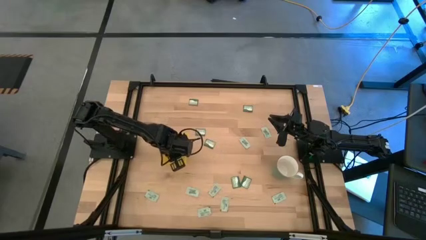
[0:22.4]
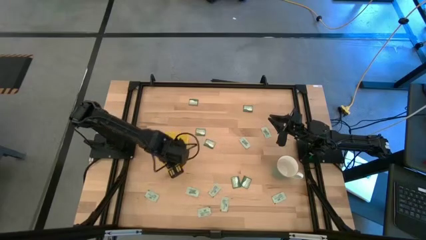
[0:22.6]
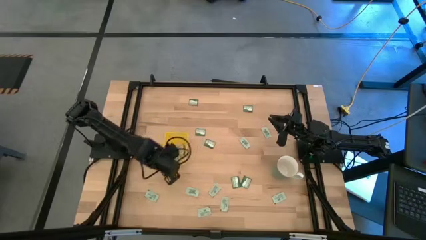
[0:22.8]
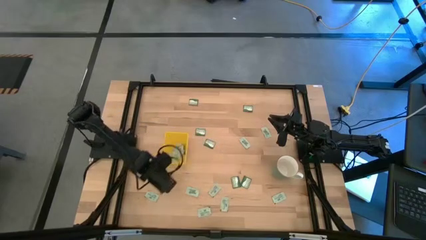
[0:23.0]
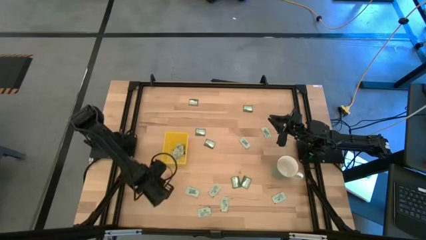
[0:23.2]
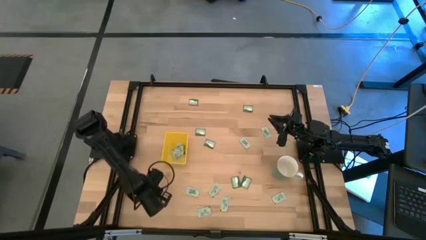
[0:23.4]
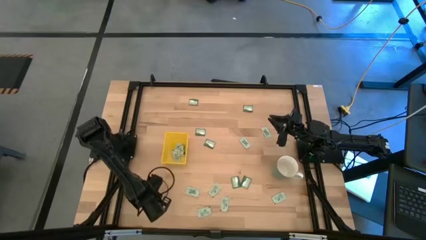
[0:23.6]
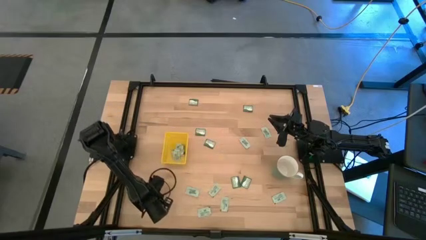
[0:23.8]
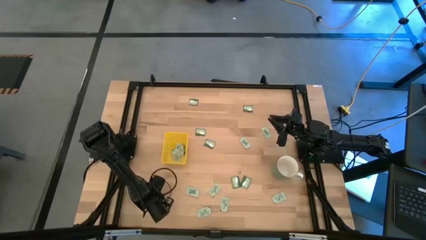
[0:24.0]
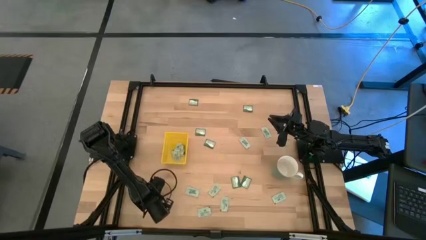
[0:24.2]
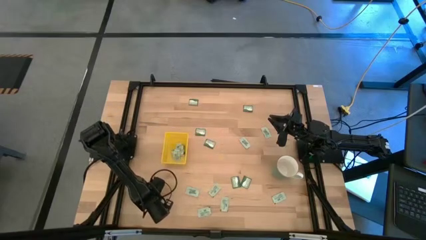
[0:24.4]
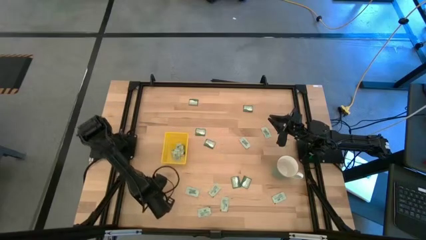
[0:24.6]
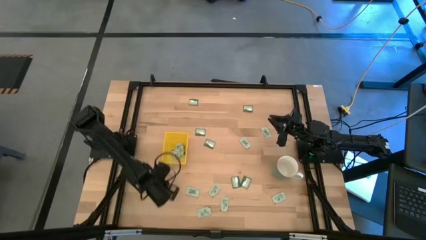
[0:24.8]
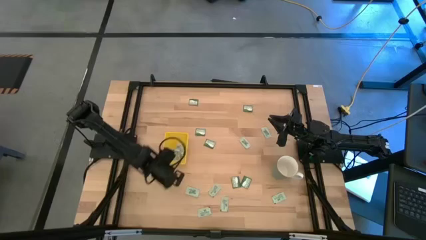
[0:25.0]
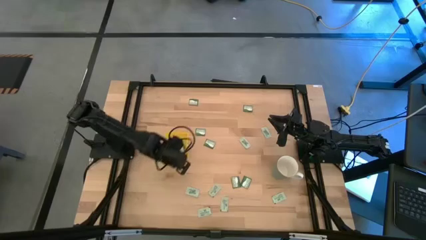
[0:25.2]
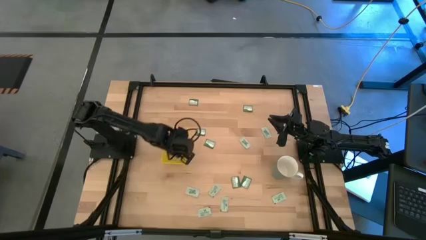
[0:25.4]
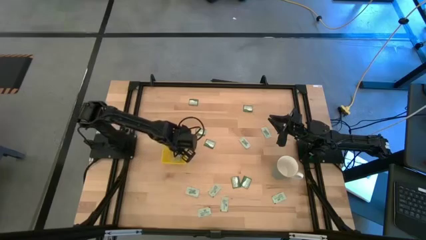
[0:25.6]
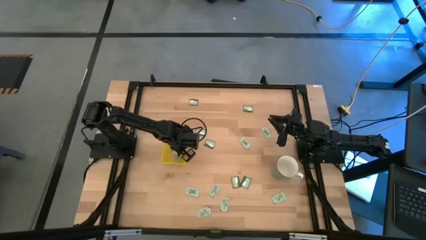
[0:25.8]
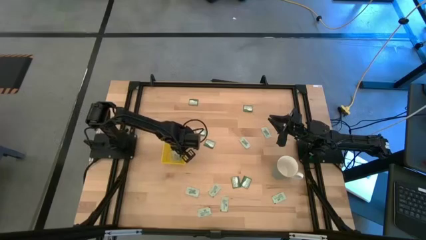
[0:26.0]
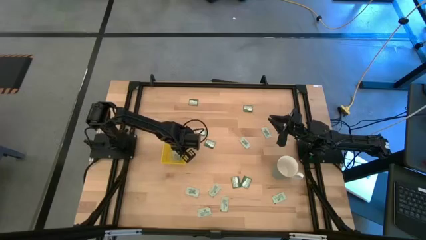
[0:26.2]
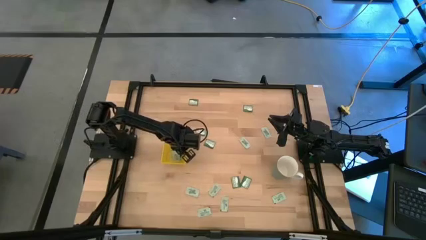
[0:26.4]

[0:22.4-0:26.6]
Task: Pick and place Stevia / Truvia into bins
Put the white packet into the yellow bin

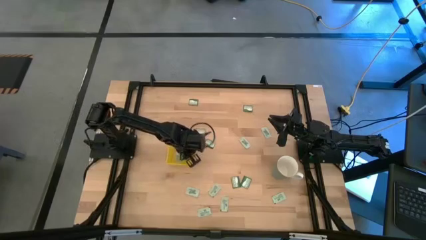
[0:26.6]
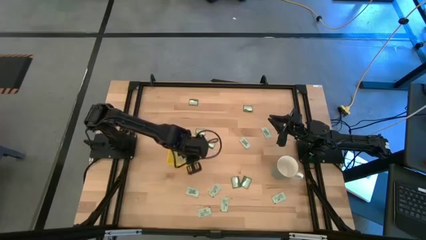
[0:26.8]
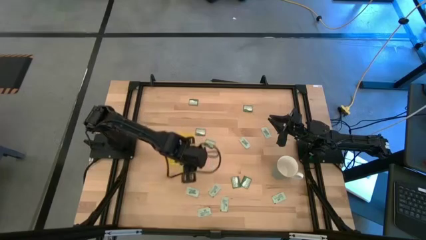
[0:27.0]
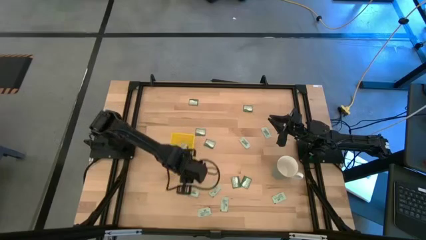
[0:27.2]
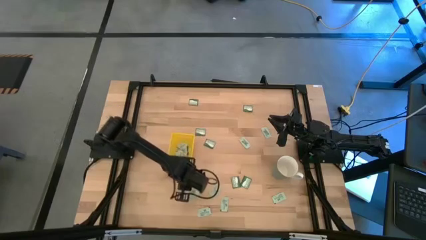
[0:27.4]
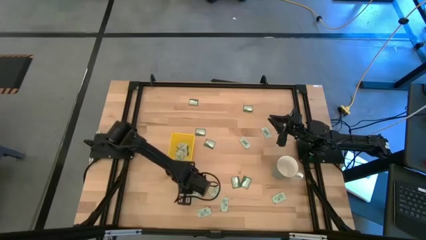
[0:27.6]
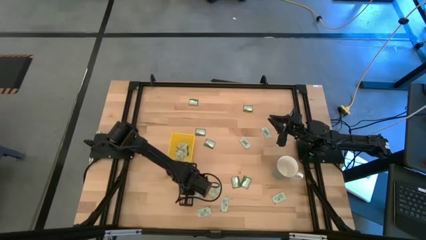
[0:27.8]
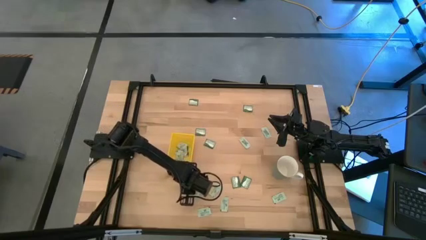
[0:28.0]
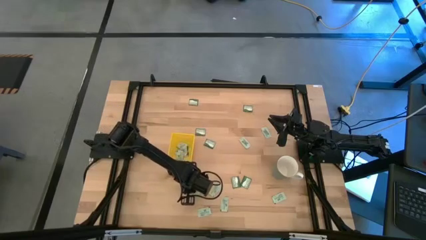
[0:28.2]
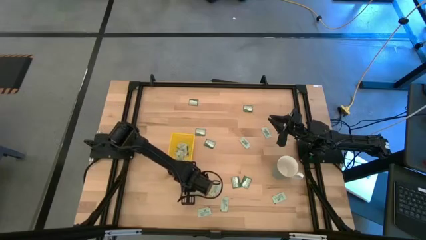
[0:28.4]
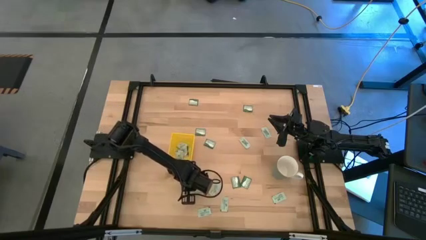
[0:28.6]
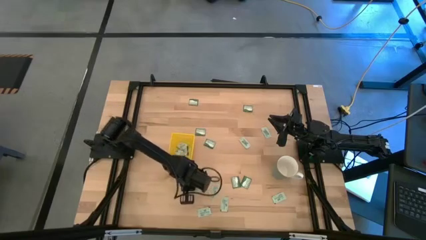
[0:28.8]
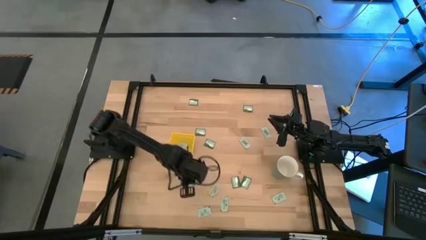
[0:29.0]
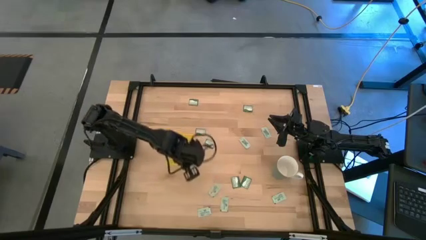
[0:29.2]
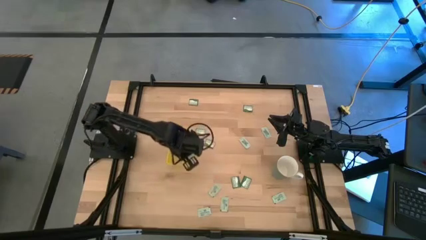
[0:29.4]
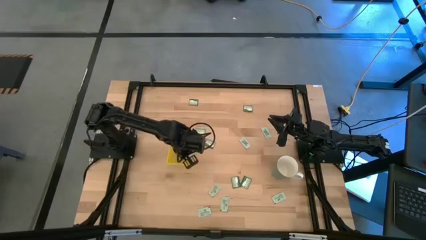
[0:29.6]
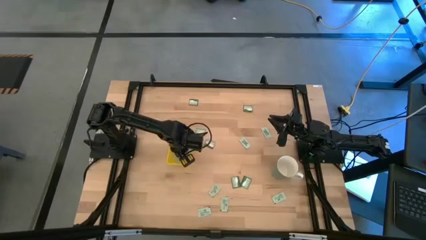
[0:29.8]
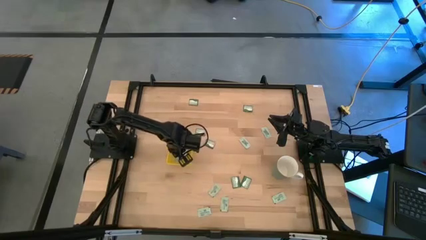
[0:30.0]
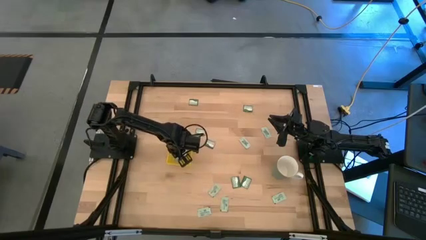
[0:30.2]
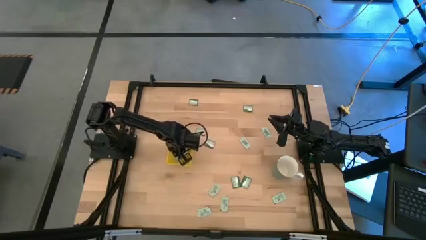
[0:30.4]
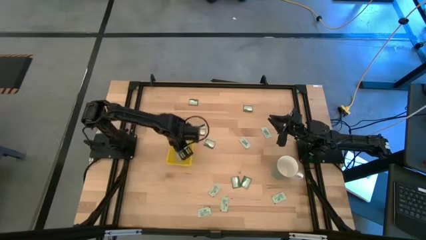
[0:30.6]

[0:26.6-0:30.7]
Put the white packet into the yellow bin

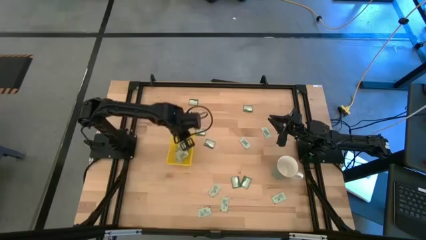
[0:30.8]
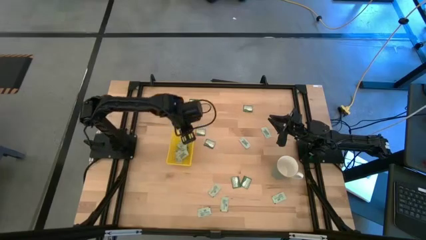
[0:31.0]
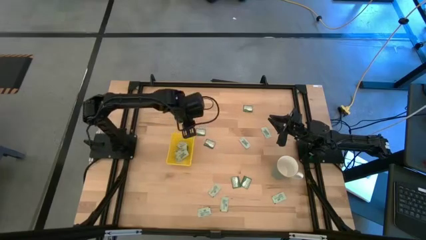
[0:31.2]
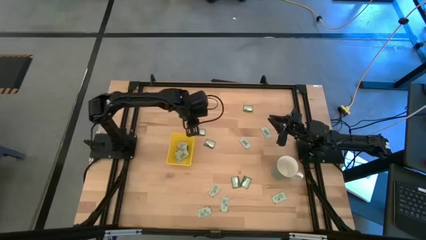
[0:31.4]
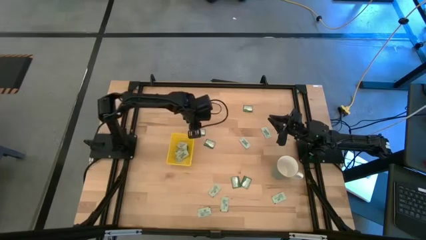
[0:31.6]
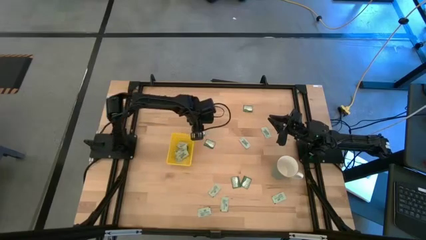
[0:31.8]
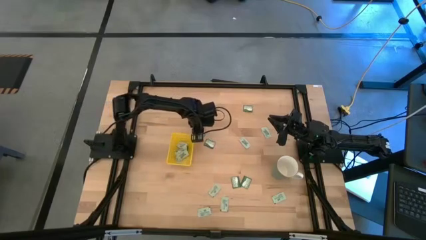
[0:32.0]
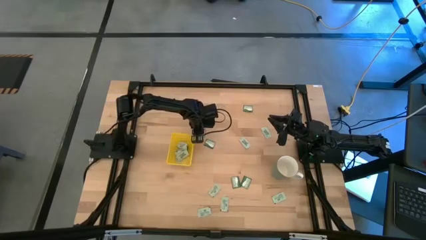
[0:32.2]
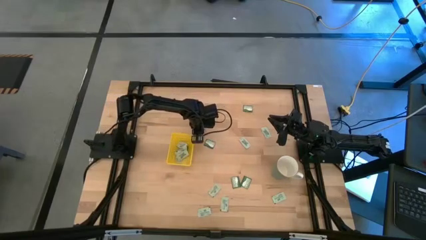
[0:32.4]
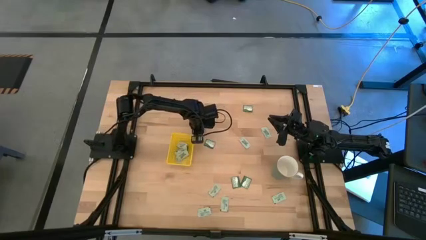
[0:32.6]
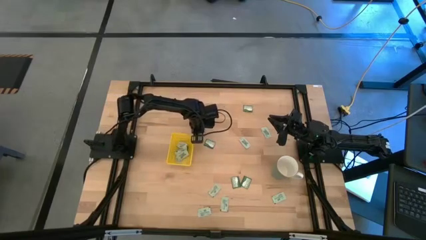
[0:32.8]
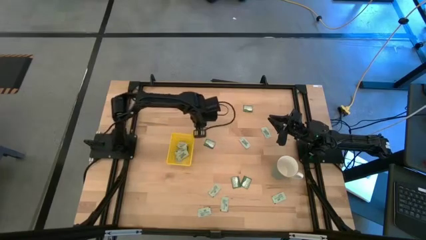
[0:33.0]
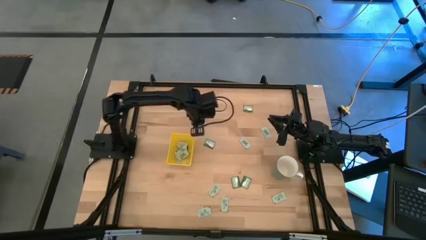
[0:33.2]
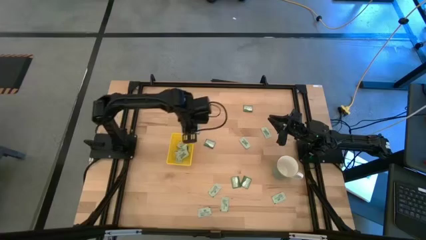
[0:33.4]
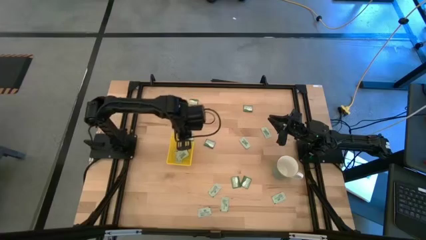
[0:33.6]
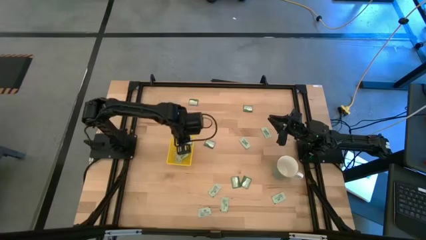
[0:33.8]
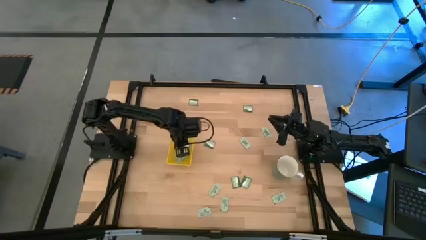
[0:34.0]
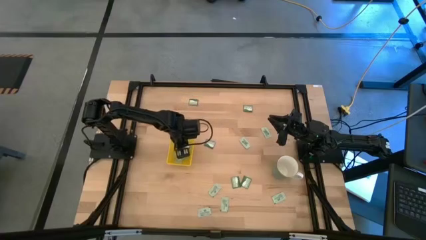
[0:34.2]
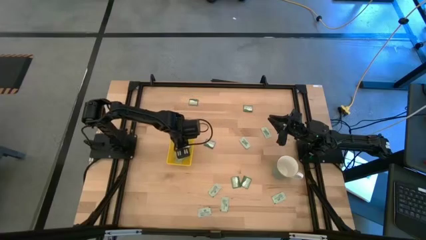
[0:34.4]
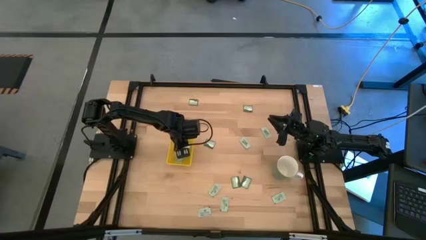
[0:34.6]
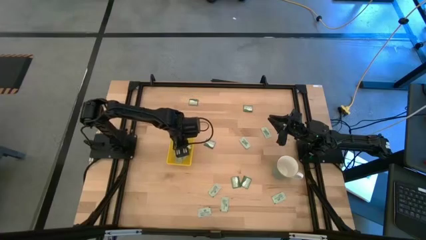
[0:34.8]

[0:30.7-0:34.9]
Put the green packet into the yellow bin

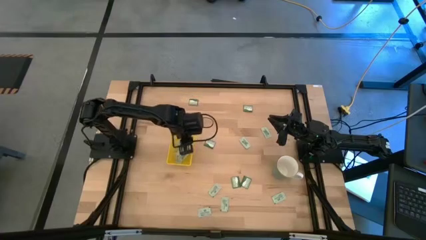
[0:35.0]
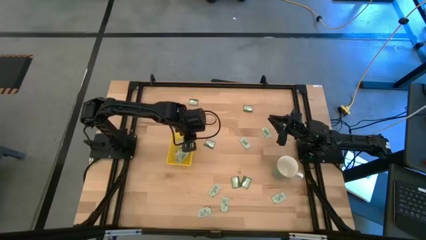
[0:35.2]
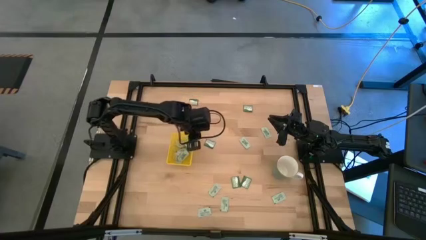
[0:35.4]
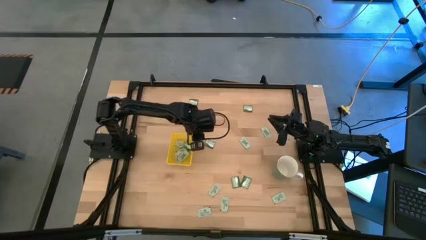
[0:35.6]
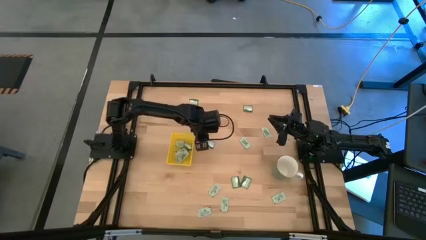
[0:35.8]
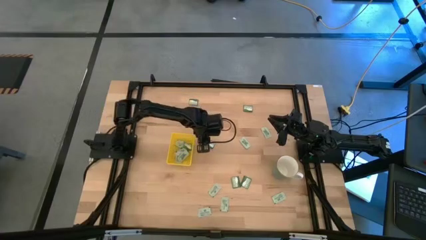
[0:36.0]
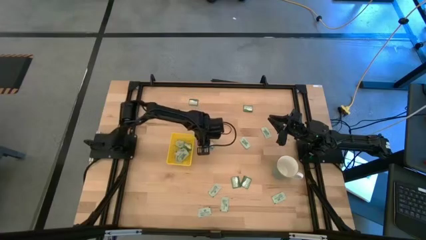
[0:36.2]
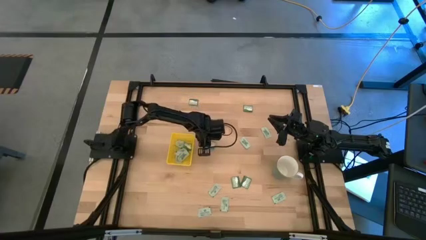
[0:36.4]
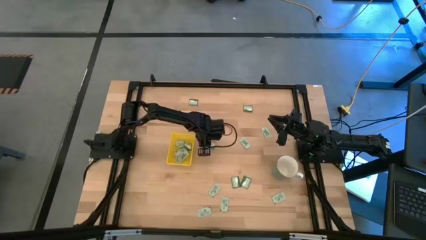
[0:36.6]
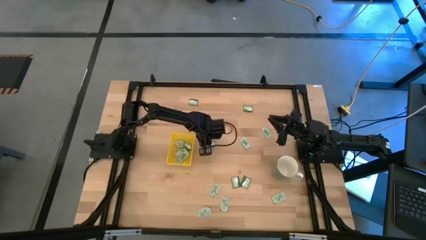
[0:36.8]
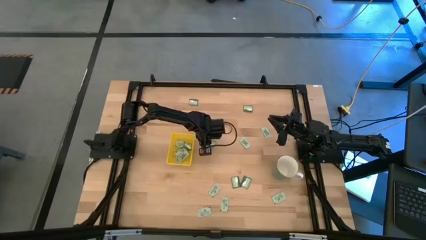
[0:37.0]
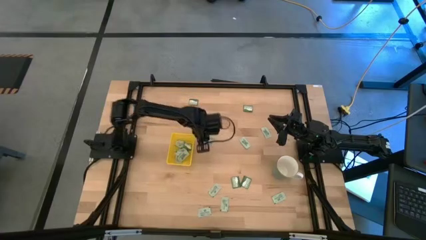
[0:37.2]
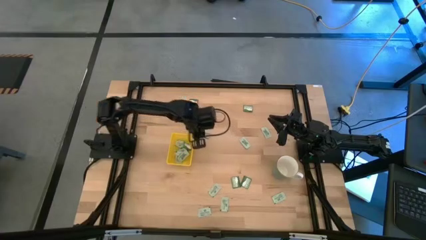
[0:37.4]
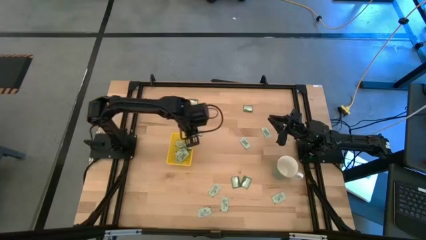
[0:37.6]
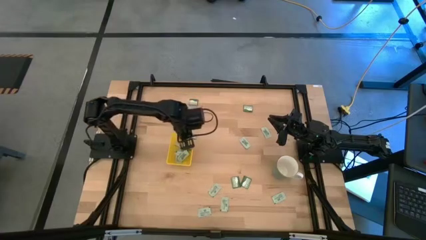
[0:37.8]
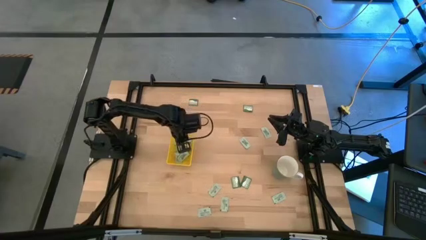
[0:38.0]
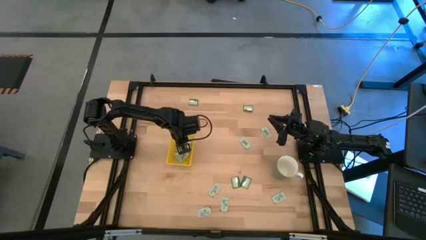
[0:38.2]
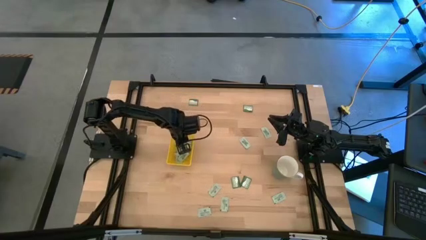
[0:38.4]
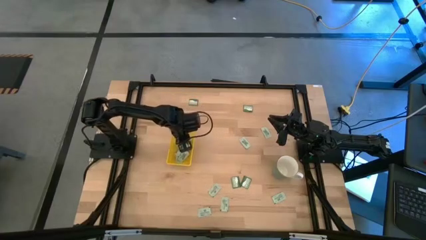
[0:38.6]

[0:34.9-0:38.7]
Put the green packet into the yellow bin
